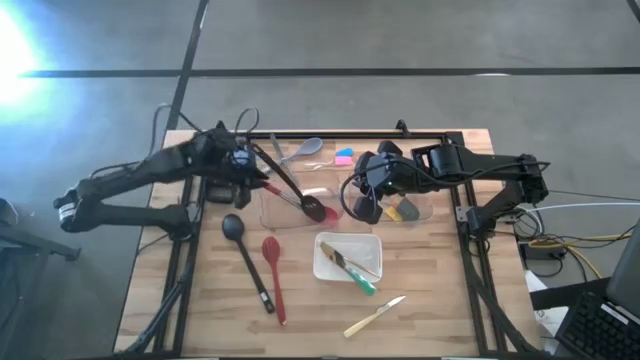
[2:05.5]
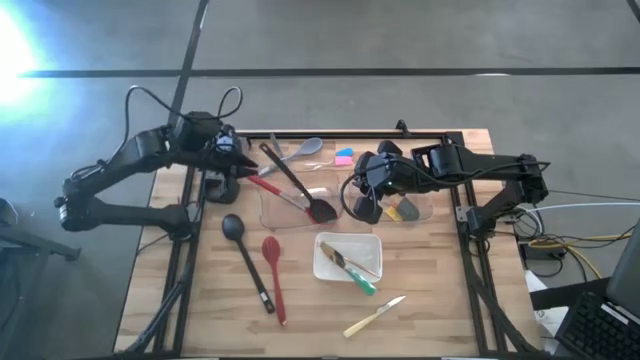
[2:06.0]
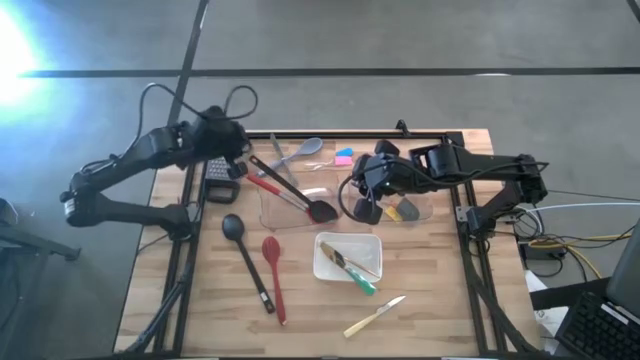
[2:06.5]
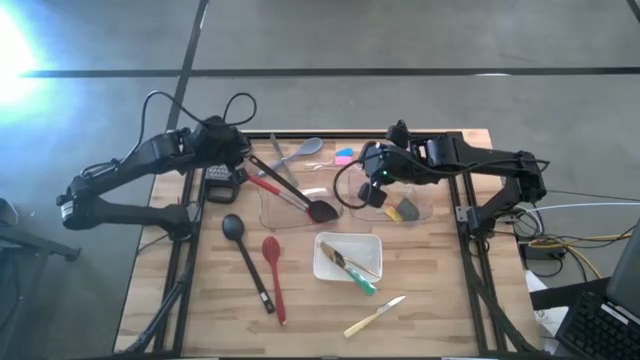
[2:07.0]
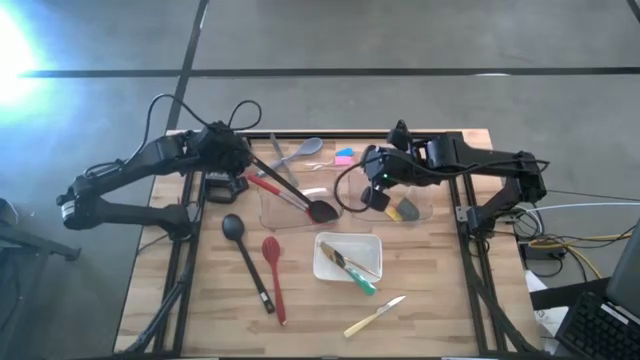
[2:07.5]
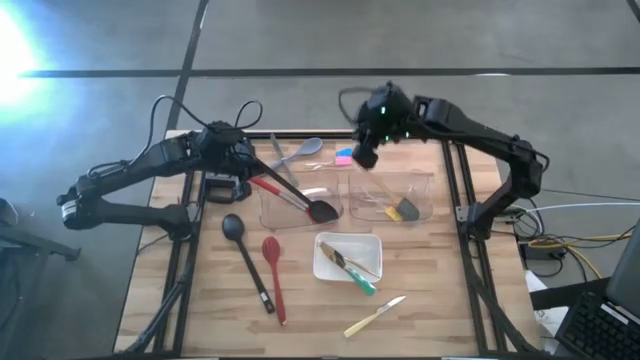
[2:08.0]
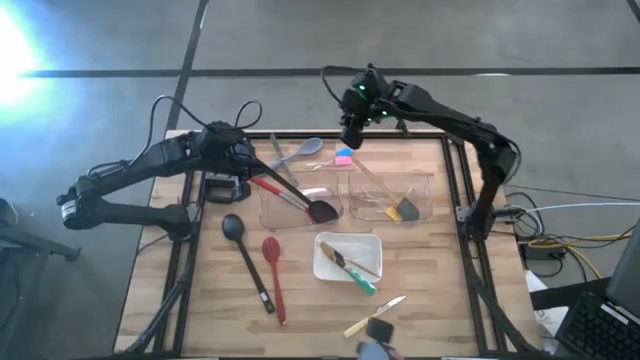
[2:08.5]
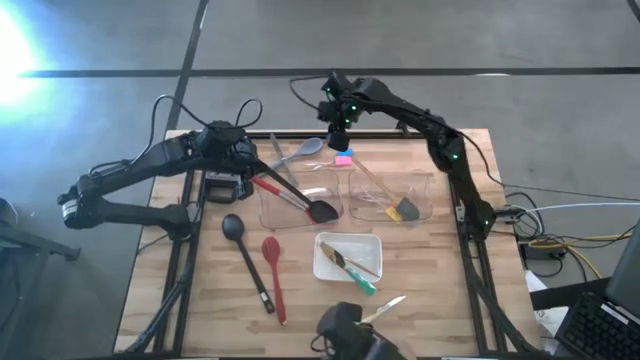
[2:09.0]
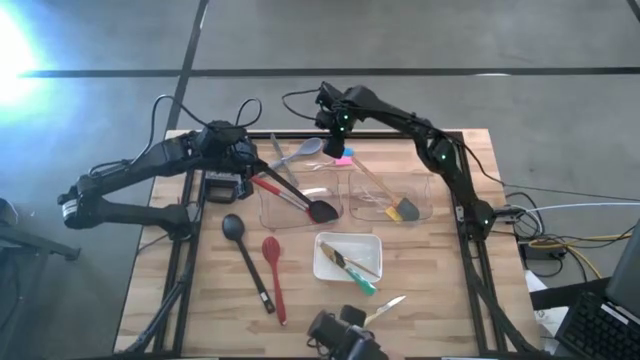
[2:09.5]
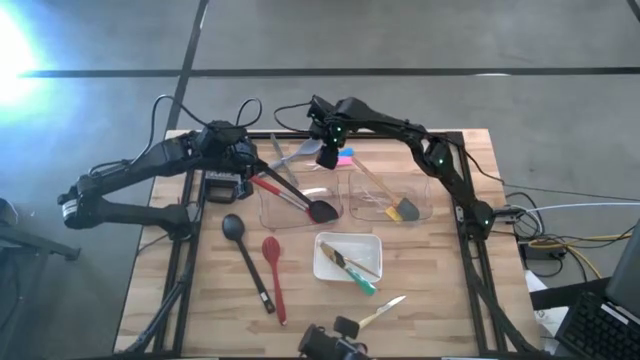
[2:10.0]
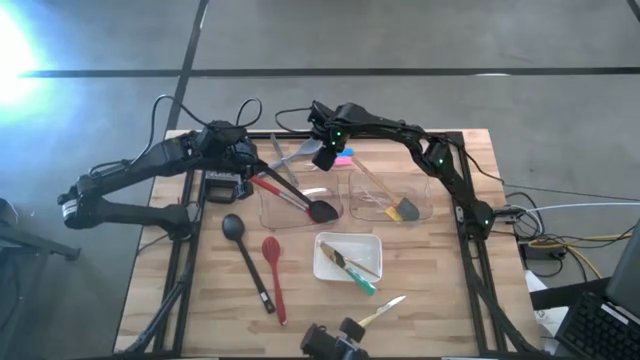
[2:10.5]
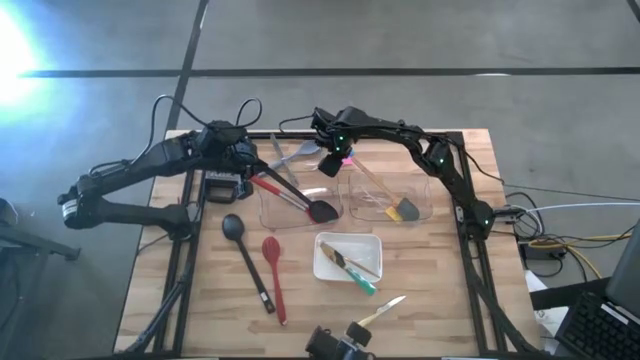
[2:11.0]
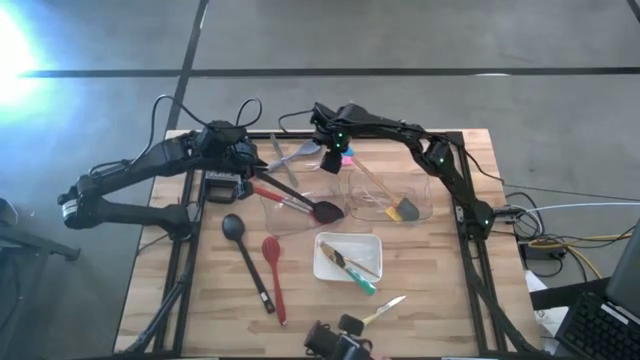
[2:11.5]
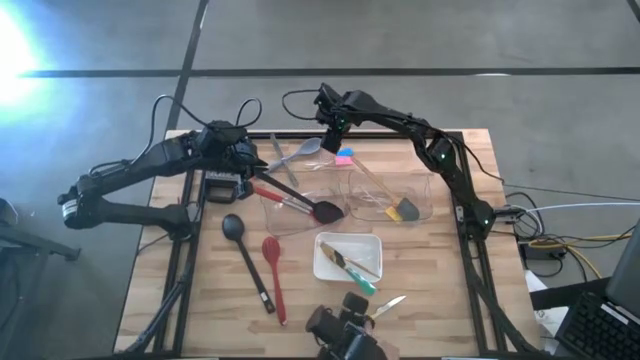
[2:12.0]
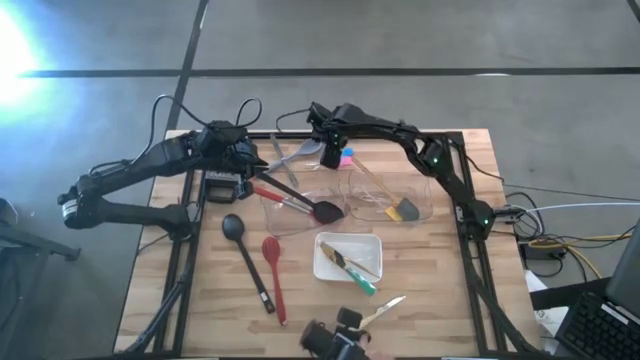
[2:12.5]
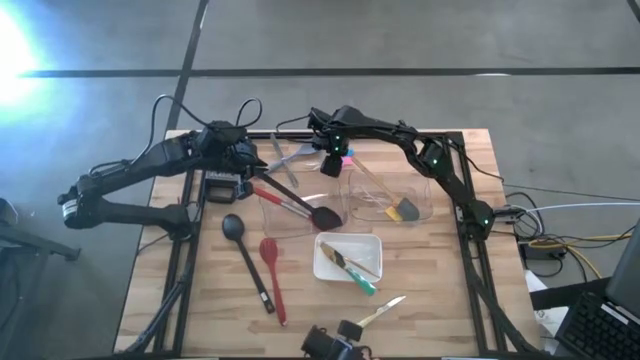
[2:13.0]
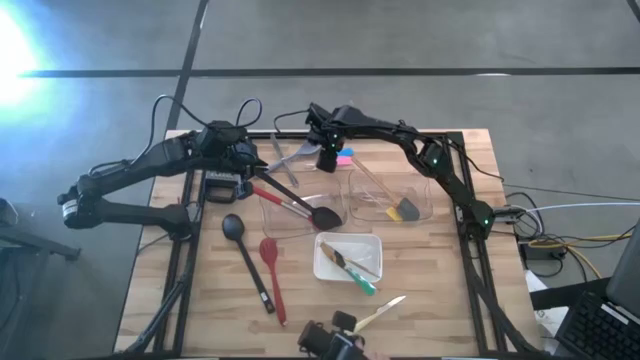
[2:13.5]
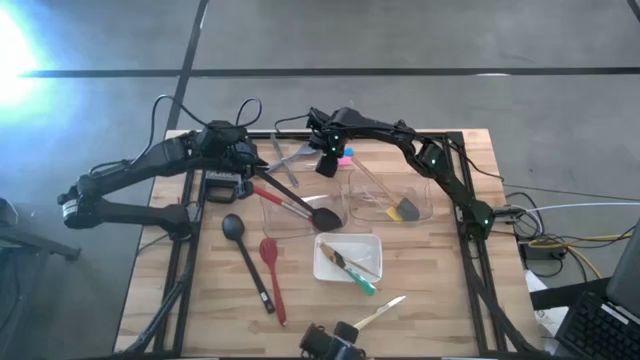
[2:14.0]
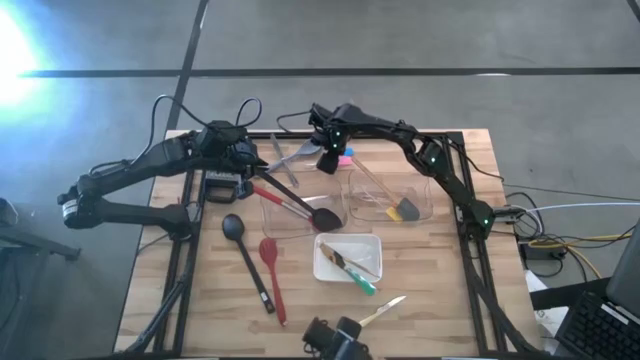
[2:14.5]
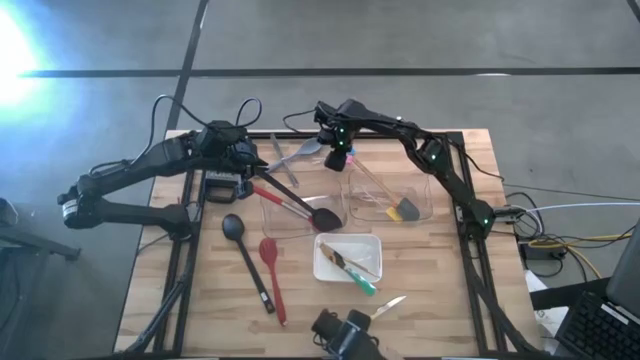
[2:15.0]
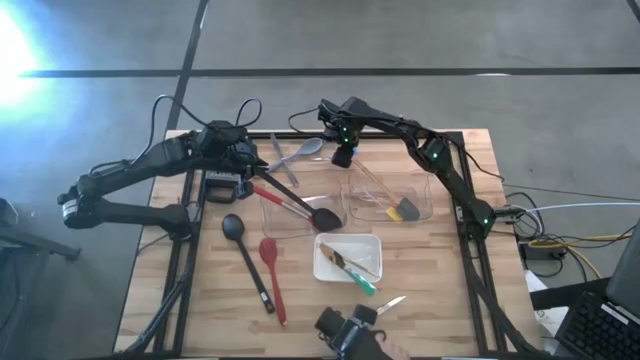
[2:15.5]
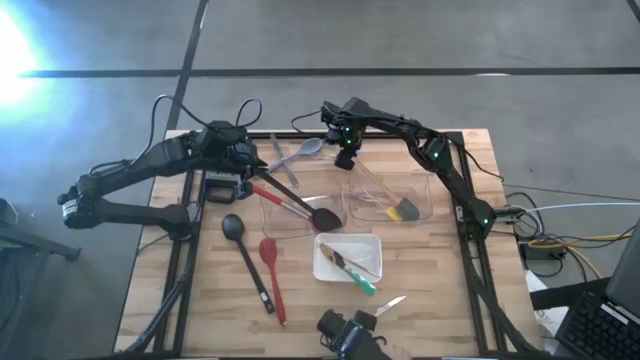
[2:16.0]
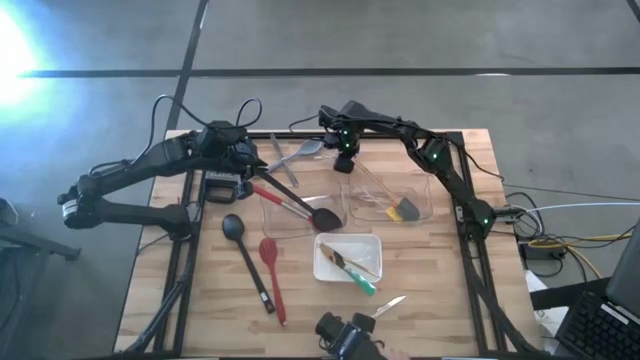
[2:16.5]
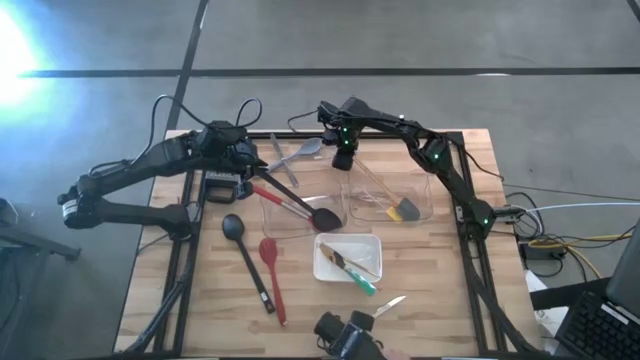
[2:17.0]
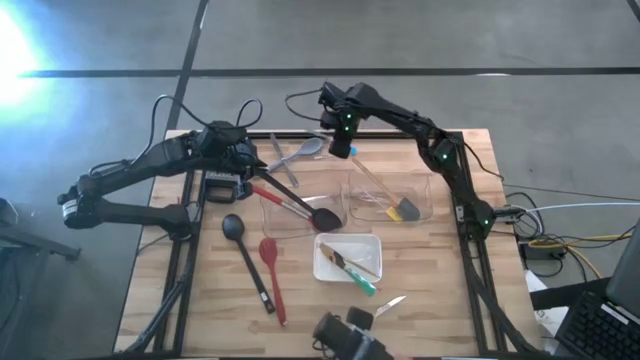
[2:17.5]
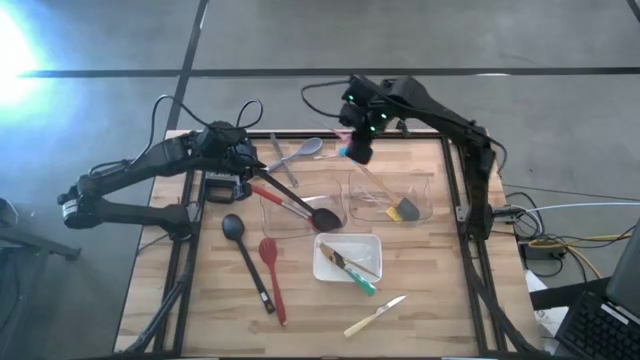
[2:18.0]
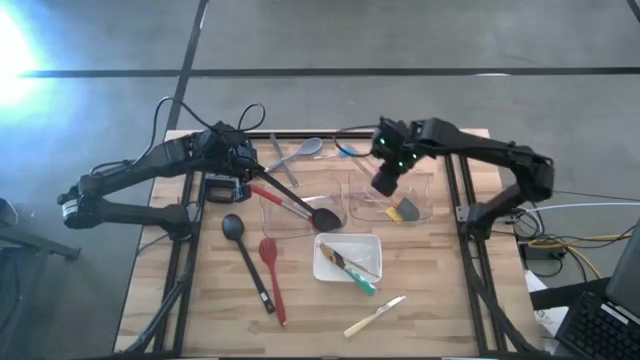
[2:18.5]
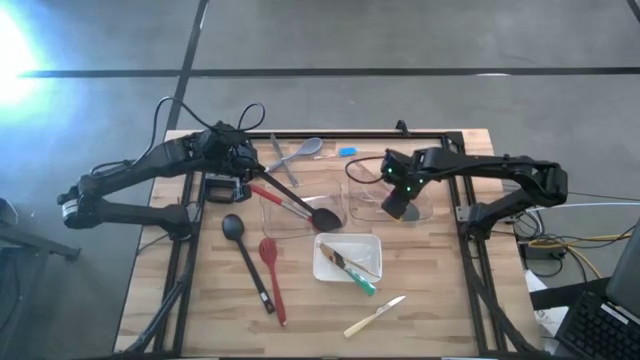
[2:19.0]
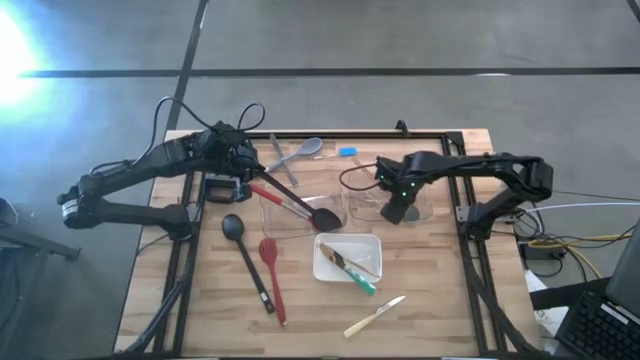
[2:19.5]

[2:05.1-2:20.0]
Task: Pick & Place Kitchen Items
Put the pink spatula into the right transparent bin

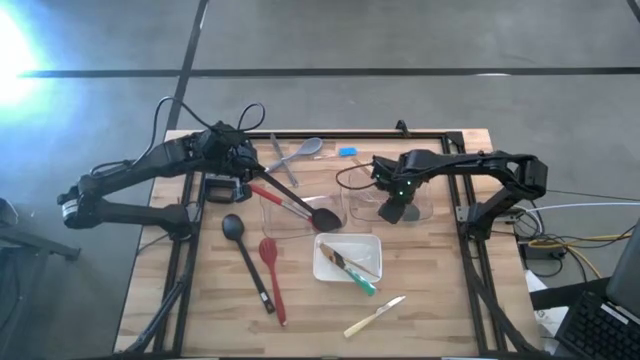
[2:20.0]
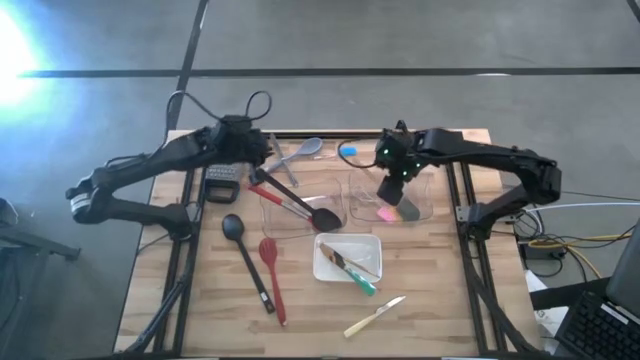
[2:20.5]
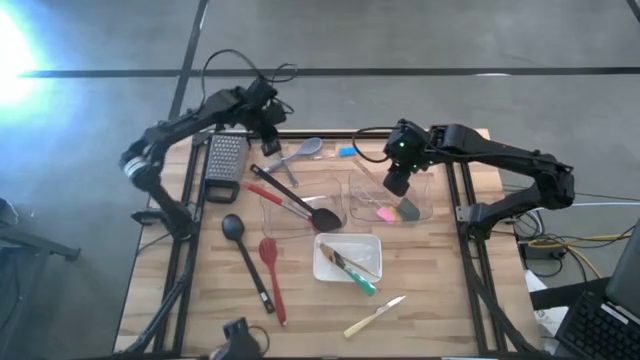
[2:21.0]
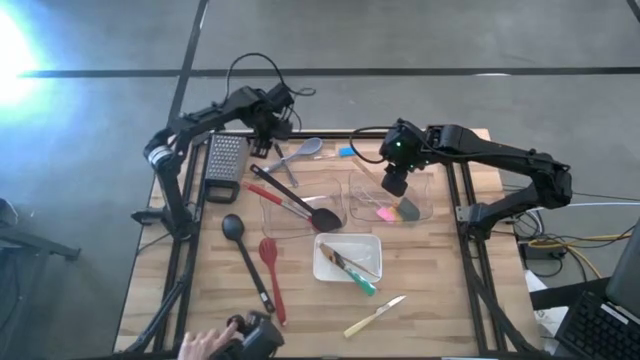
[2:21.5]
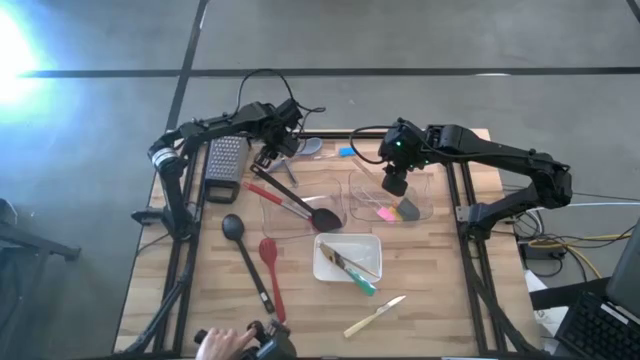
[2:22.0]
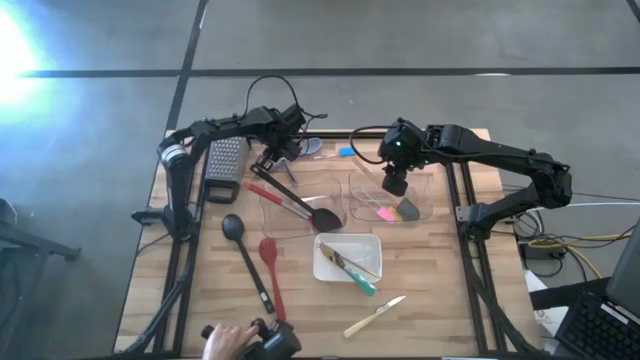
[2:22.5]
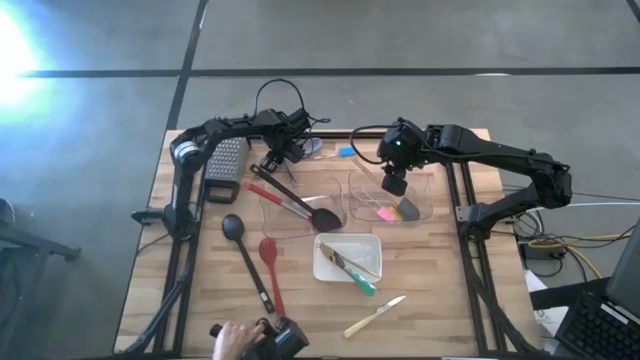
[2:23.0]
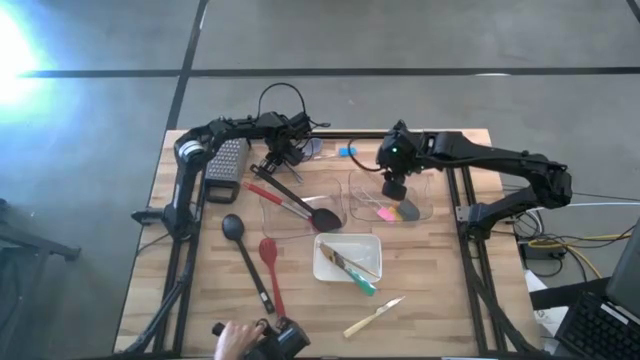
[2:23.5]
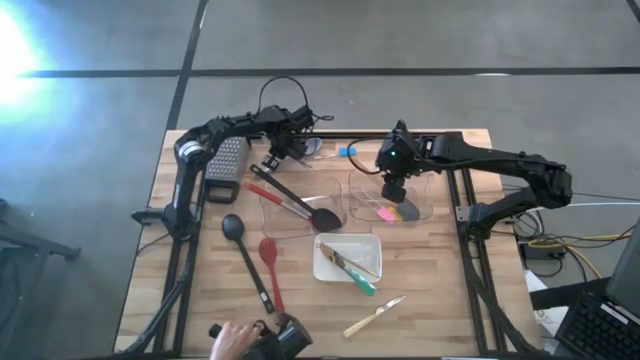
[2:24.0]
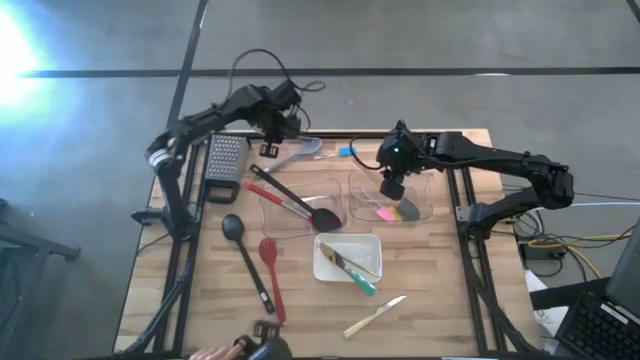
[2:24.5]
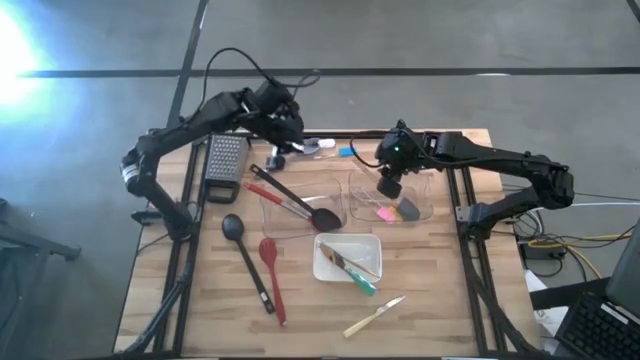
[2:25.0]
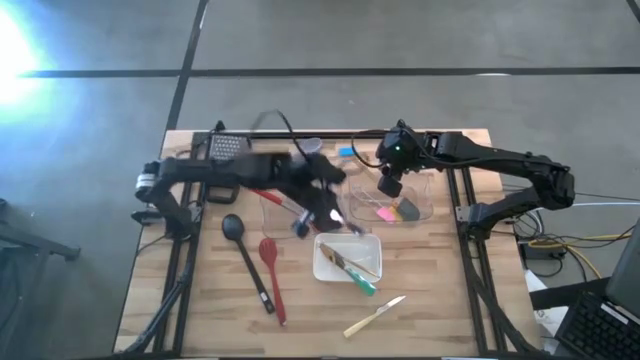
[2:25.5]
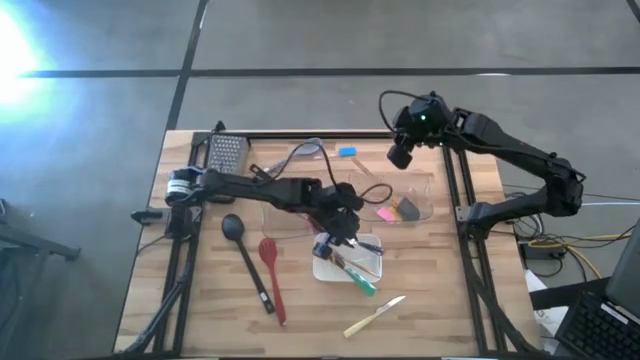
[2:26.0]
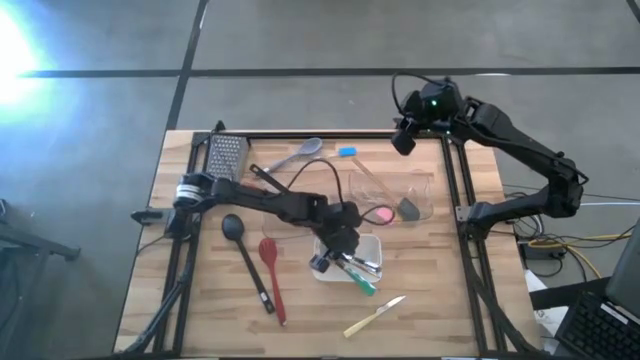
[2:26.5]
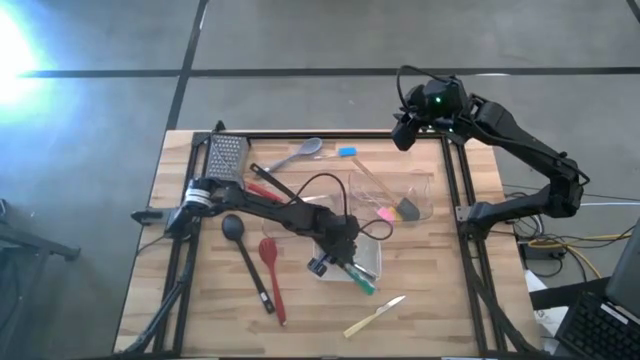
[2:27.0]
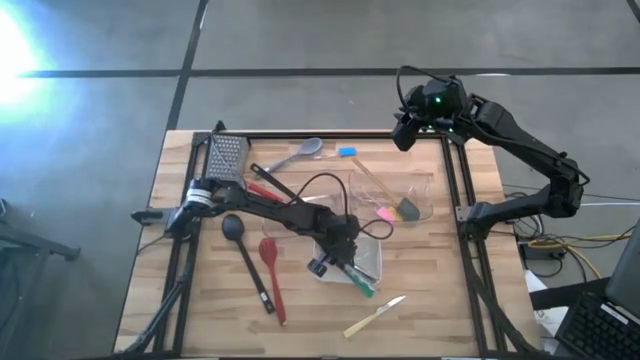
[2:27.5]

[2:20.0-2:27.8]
Put the silver table knife into the white bin
